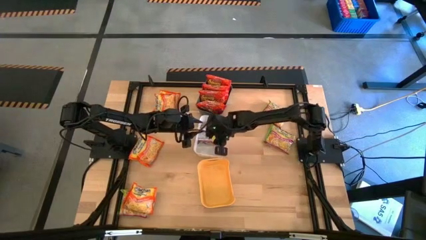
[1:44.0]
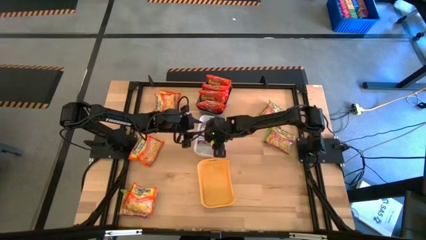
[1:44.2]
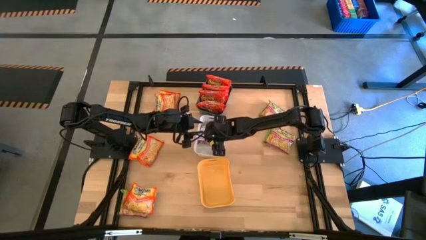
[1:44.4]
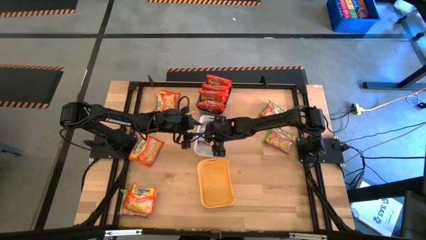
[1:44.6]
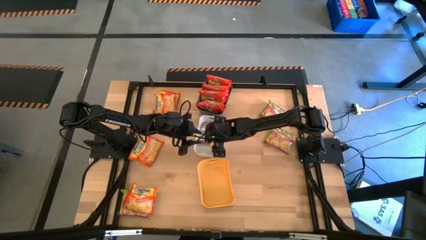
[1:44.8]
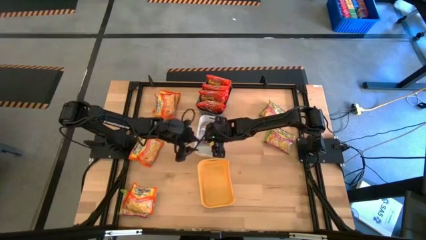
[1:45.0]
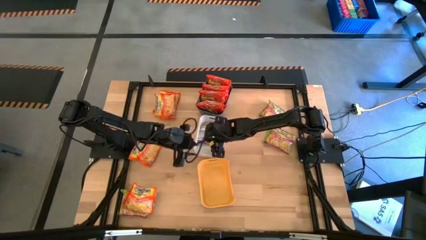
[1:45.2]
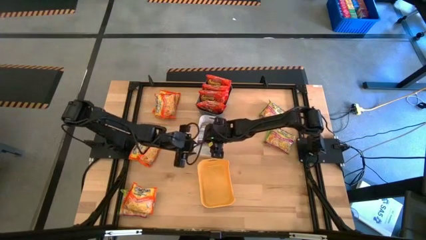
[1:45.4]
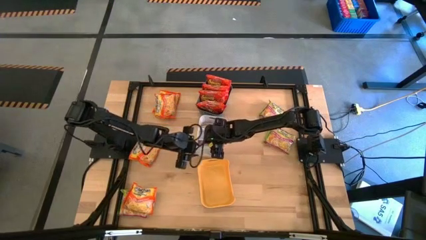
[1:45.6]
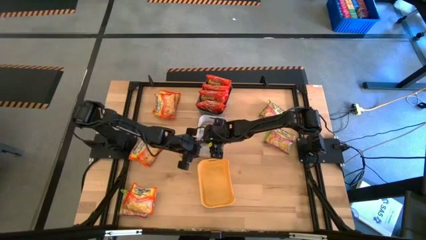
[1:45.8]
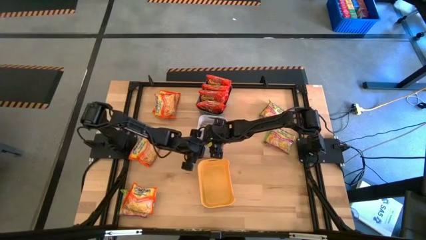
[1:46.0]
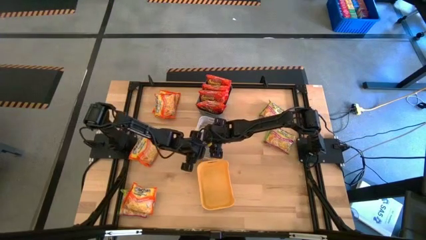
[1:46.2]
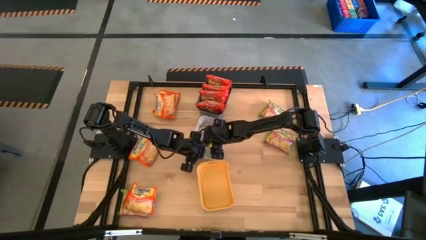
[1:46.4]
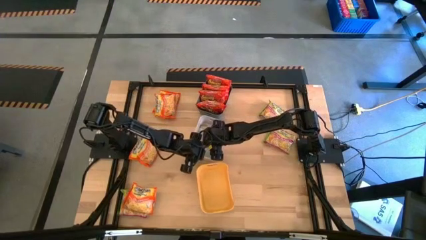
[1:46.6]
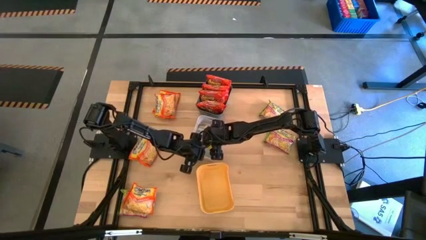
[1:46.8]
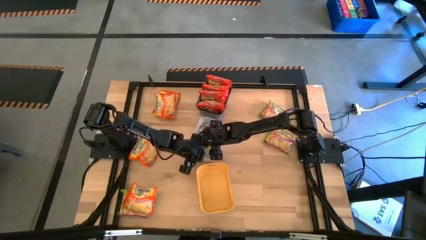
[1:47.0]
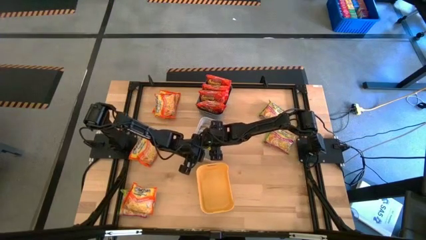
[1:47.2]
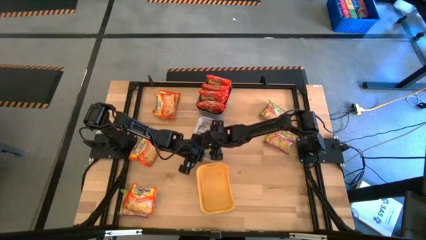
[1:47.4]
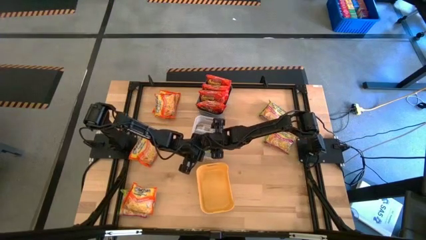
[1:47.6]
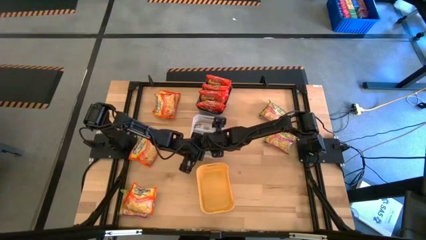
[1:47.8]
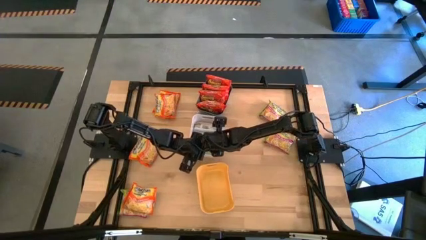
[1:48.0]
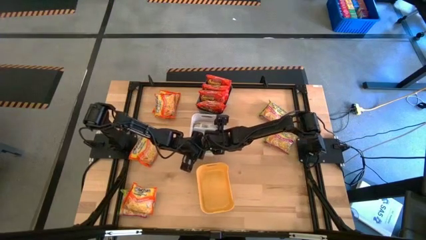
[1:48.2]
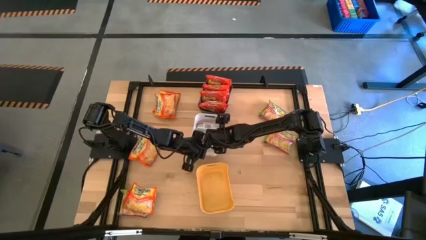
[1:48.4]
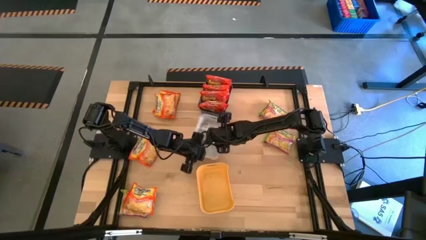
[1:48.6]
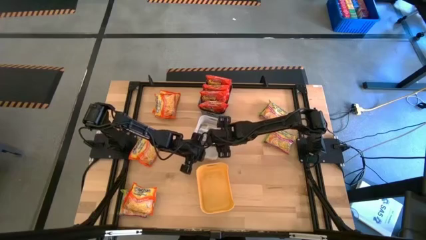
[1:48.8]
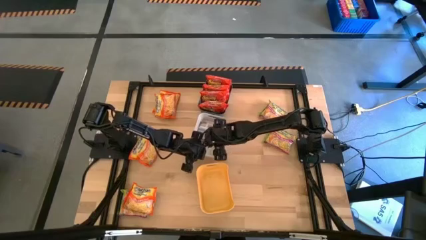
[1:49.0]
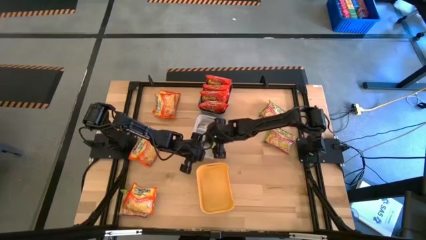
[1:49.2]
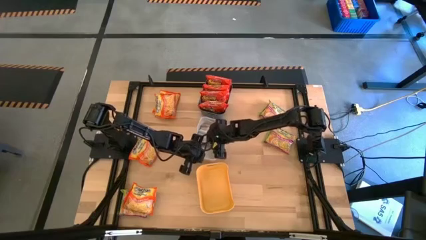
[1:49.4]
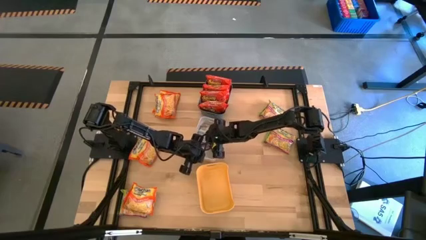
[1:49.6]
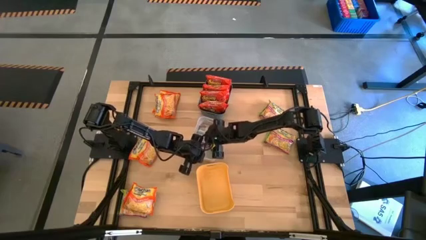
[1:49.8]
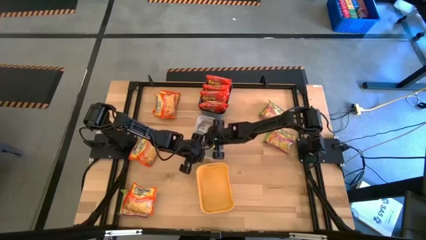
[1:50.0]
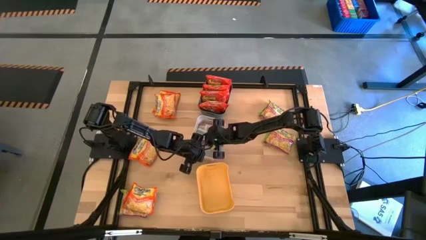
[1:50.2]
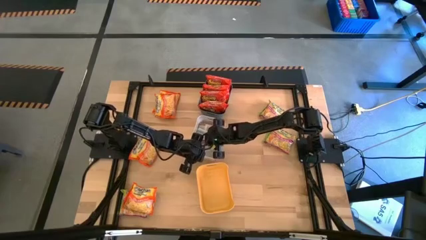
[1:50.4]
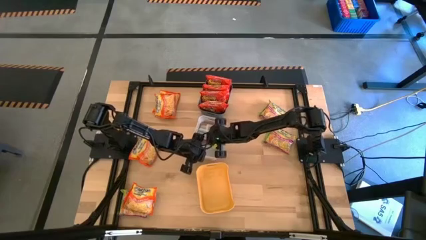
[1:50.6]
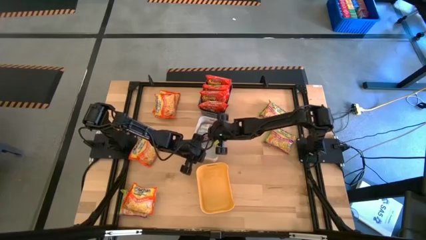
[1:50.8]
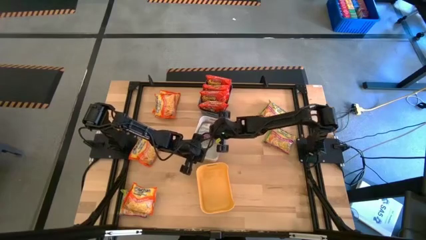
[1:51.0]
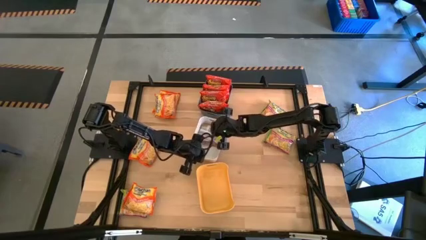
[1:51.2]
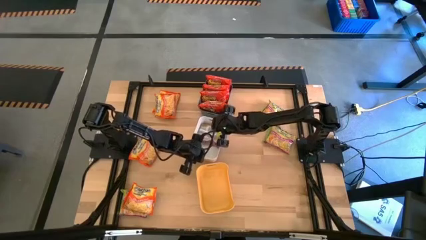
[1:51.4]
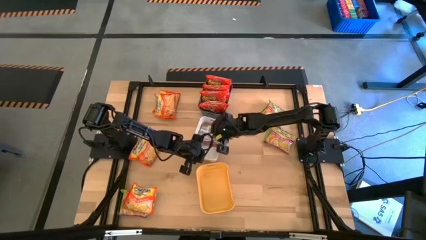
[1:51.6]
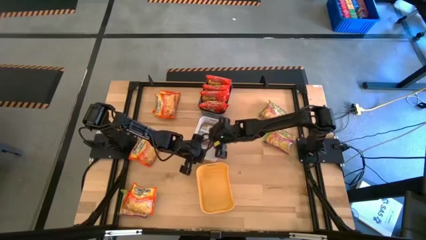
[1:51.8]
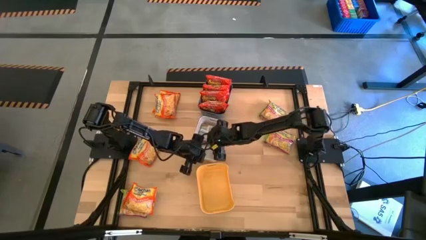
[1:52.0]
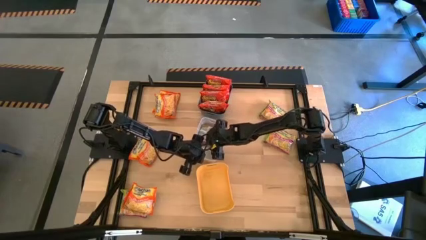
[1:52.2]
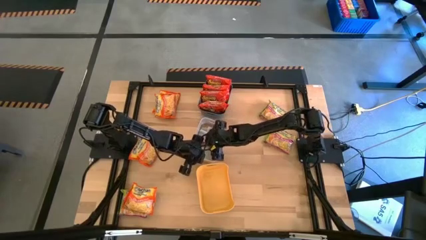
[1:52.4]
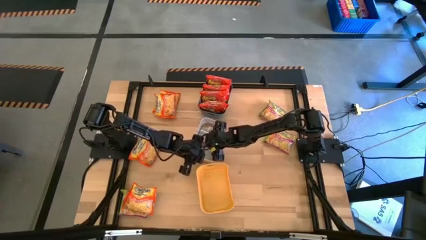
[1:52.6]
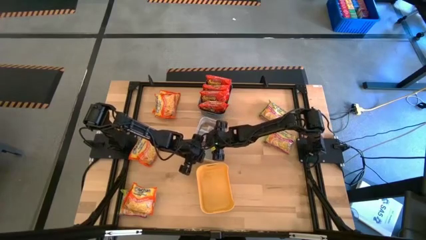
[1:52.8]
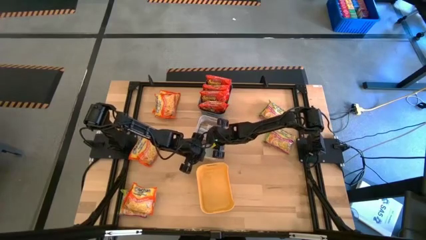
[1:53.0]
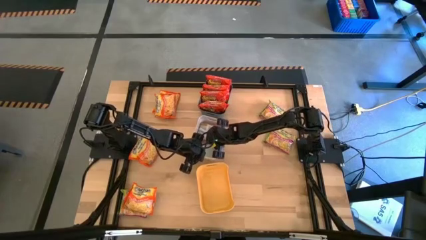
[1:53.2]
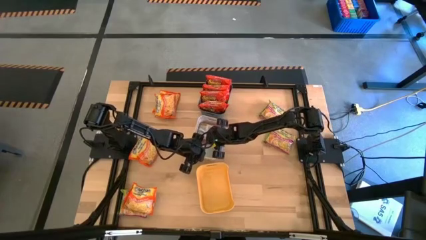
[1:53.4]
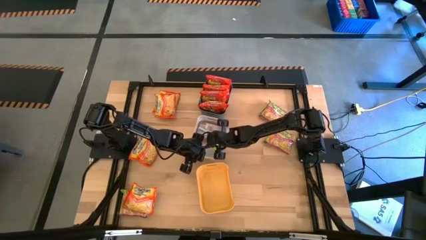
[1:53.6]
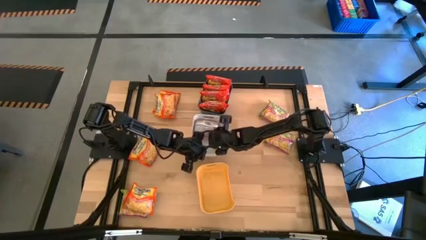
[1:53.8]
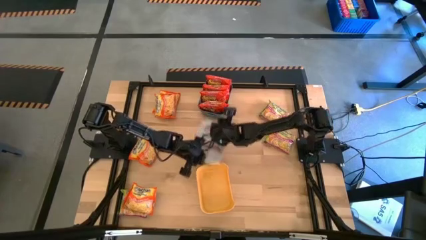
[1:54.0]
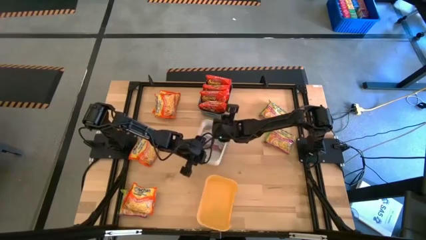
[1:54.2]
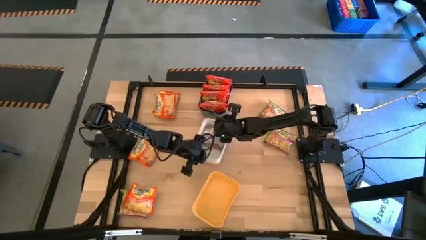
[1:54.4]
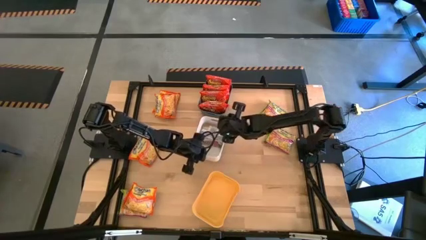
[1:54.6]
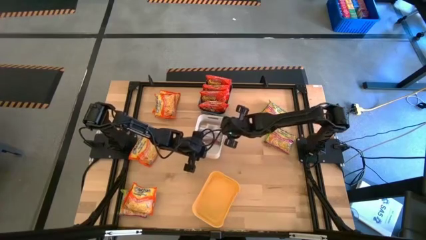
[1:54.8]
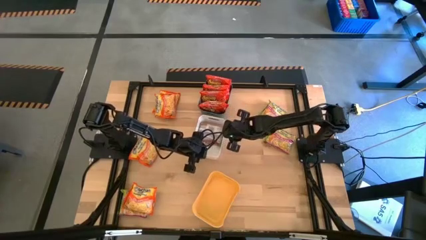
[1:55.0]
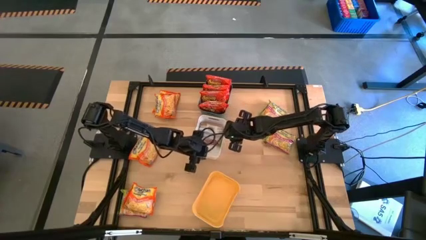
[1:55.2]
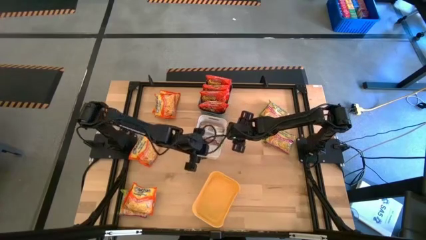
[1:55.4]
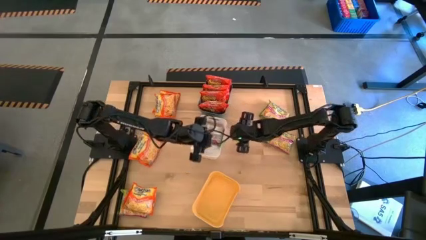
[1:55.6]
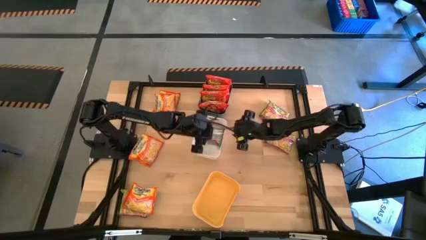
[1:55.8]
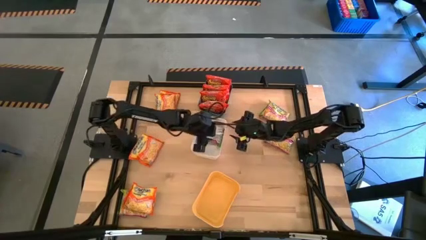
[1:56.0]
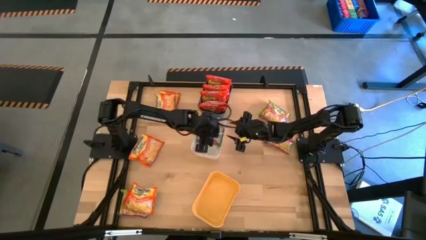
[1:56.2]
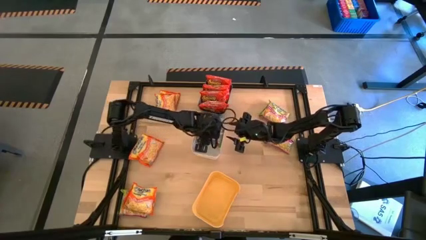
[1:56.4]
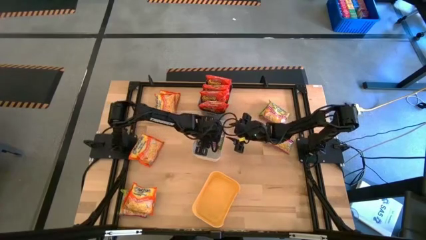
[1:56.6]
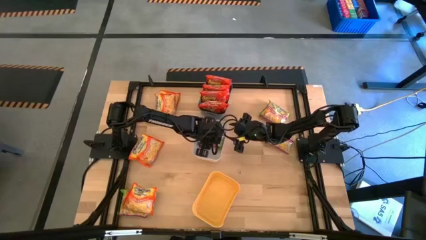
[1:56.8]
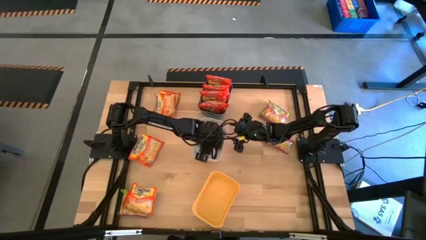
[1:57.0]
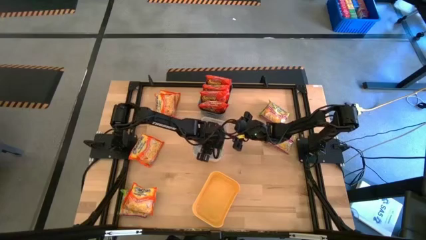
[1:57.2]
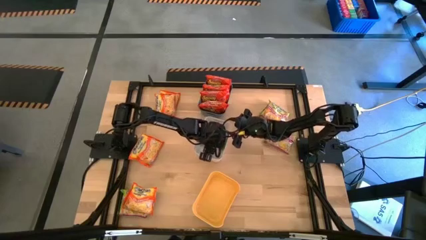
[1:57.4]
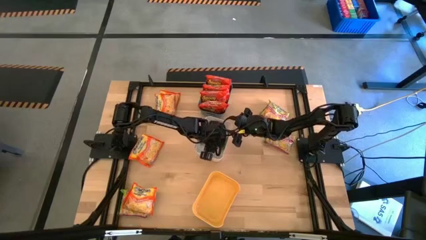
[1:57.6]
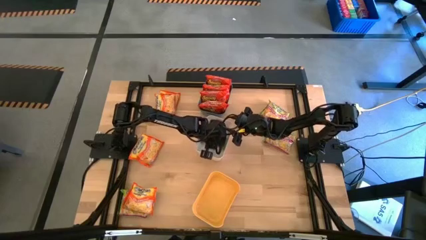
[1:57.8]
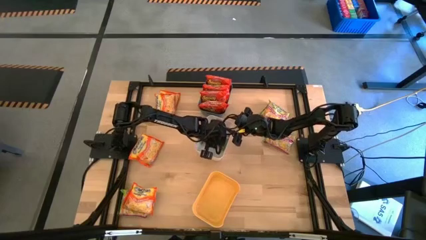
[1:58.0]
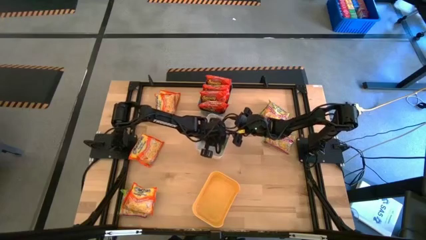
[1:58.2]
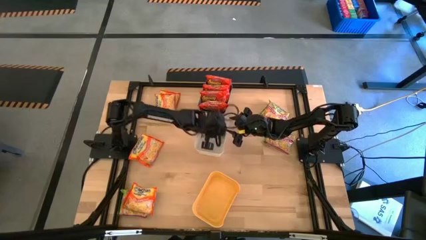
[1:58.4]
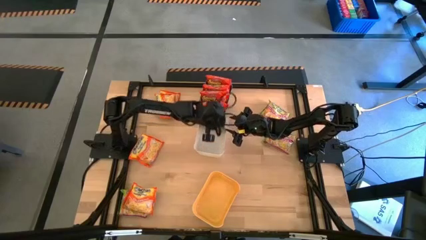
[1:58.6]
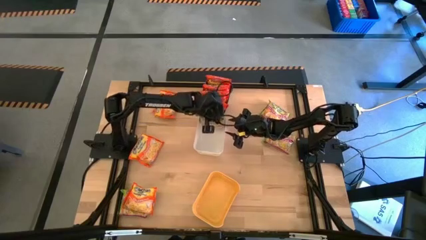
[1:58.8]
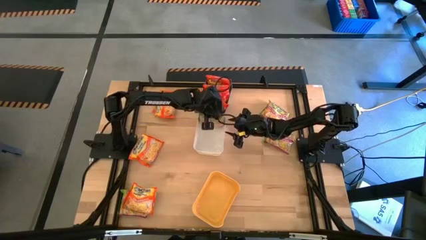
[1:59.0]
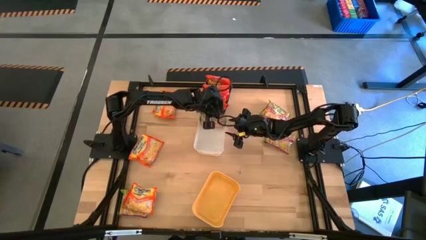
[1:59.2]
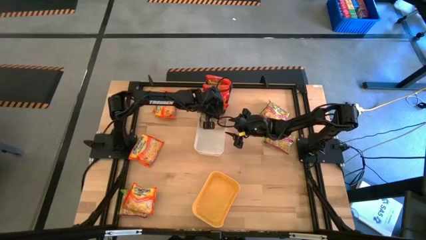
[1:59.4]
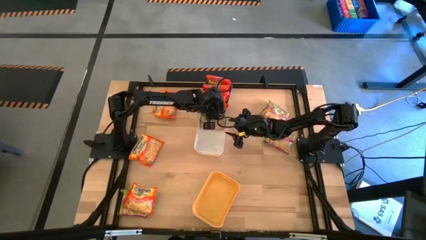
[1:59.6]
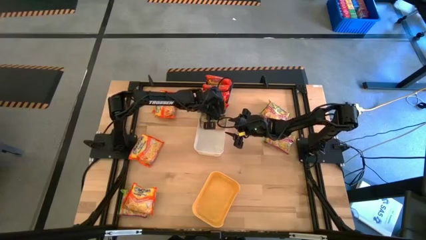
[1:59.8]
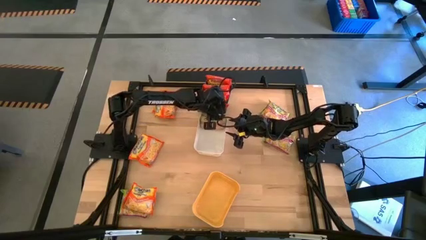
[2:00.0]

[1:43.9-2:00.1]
Task: Sort Maruchan noodles
Put the green noodle pack into the white bin
